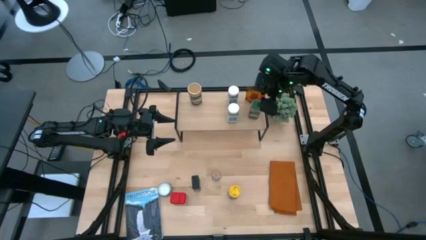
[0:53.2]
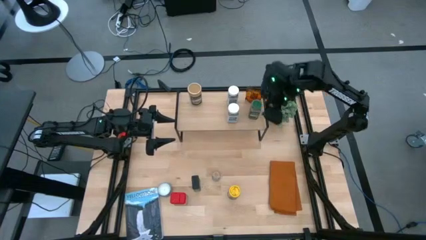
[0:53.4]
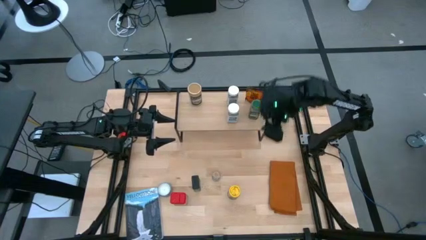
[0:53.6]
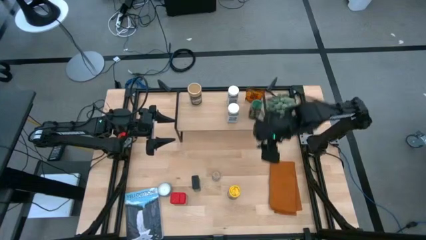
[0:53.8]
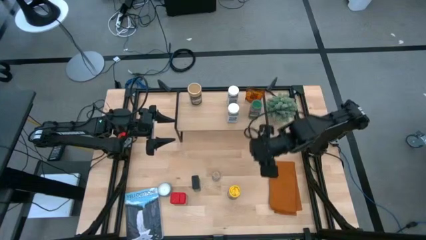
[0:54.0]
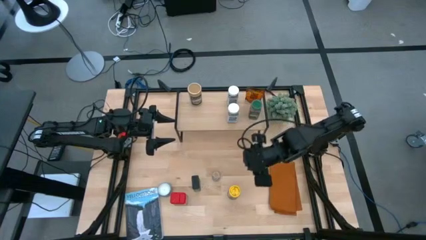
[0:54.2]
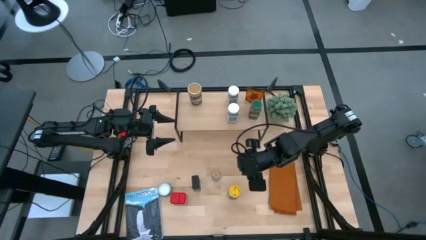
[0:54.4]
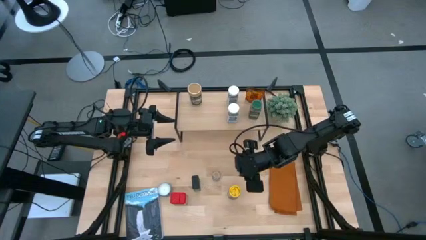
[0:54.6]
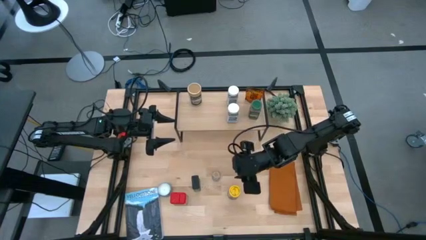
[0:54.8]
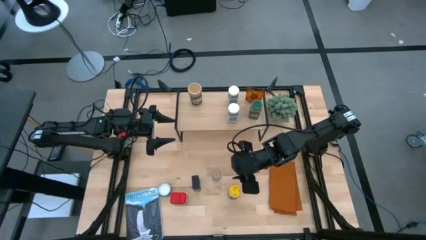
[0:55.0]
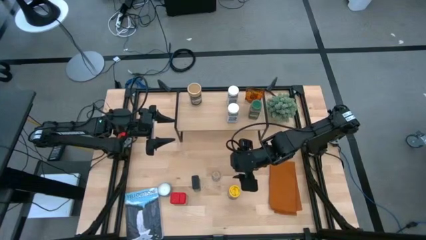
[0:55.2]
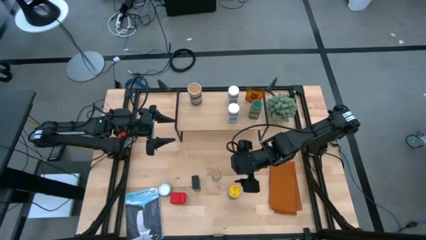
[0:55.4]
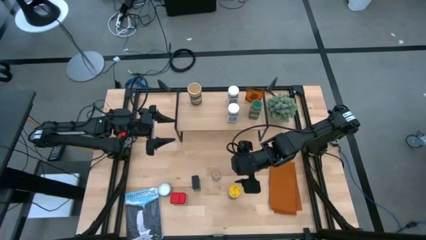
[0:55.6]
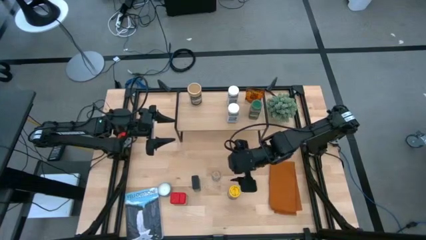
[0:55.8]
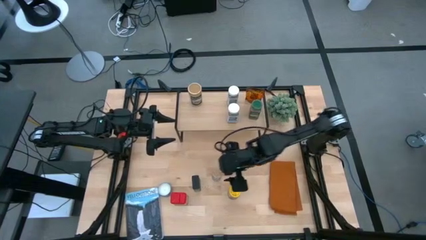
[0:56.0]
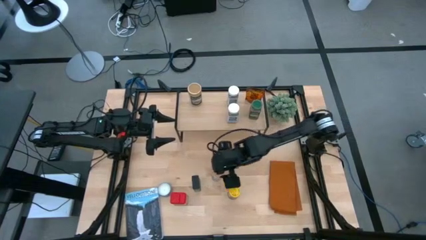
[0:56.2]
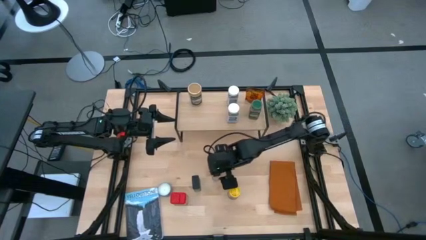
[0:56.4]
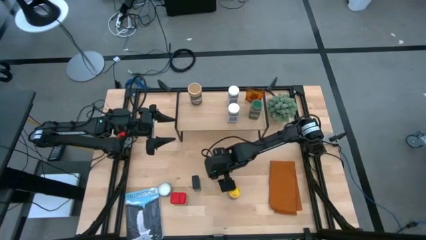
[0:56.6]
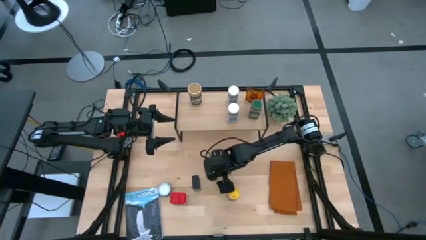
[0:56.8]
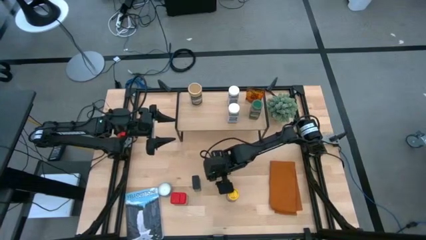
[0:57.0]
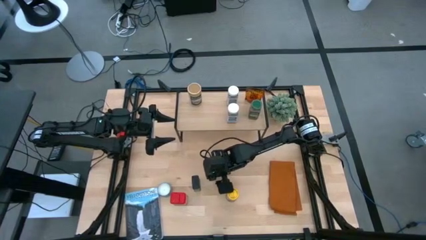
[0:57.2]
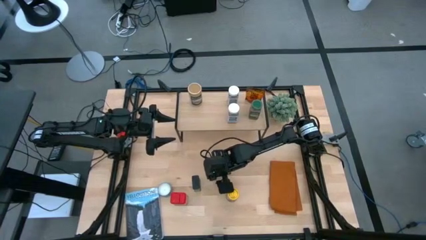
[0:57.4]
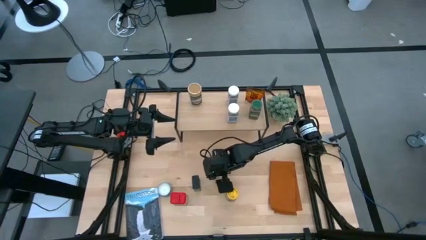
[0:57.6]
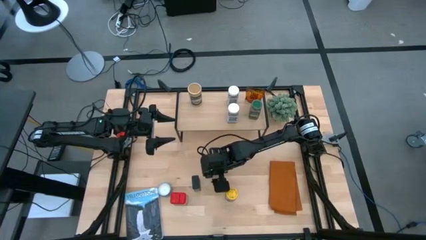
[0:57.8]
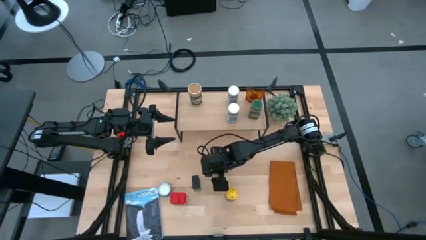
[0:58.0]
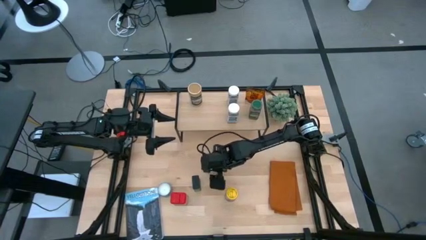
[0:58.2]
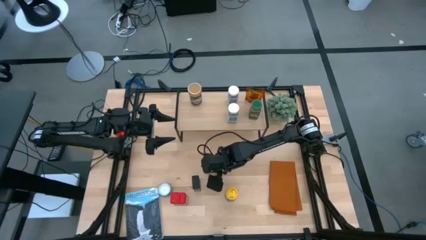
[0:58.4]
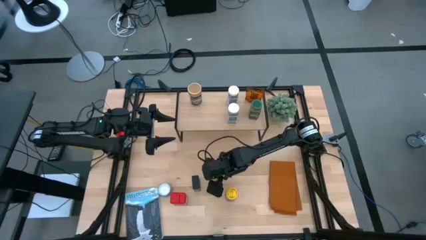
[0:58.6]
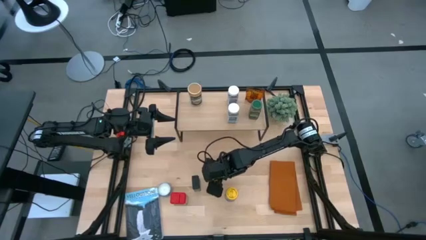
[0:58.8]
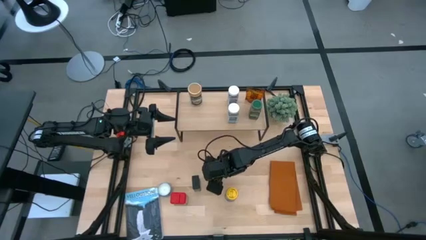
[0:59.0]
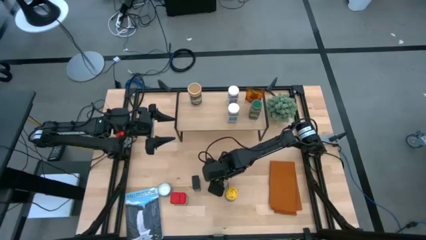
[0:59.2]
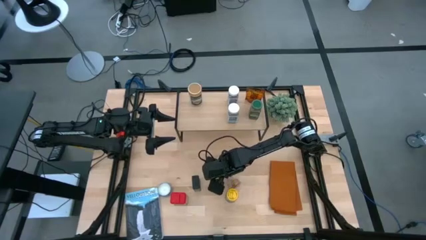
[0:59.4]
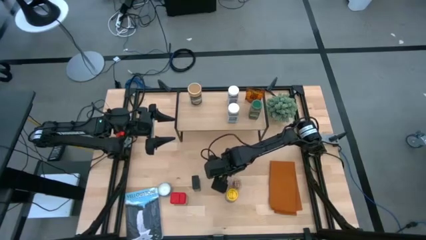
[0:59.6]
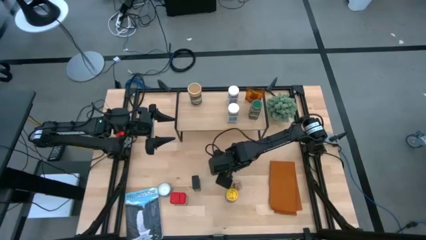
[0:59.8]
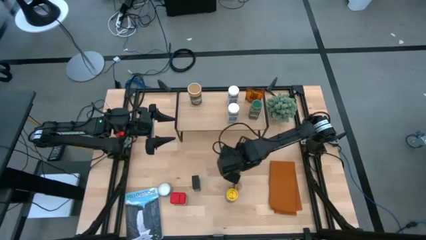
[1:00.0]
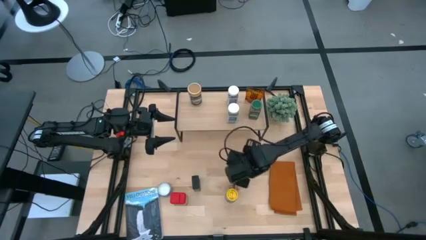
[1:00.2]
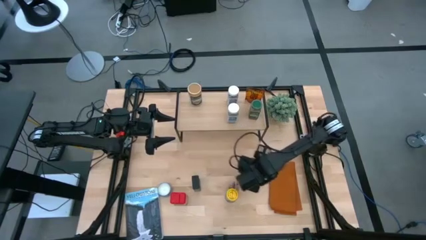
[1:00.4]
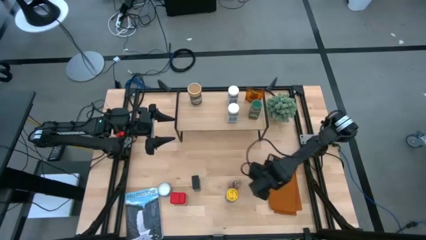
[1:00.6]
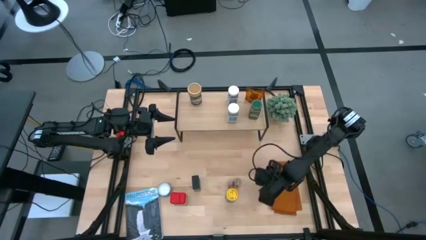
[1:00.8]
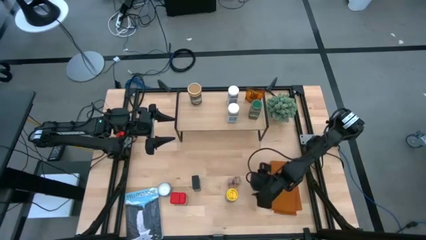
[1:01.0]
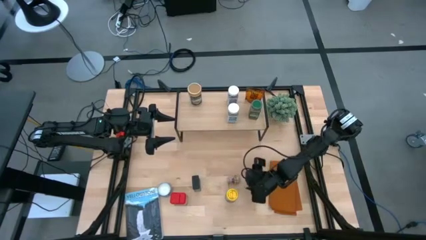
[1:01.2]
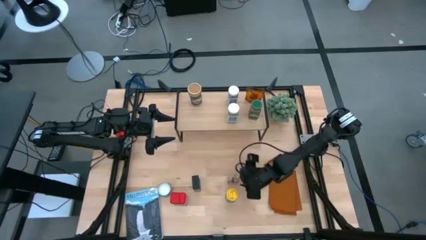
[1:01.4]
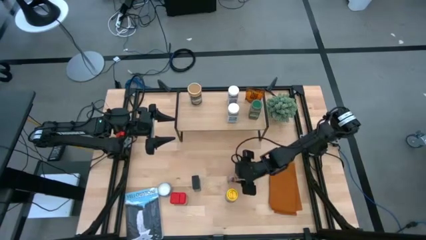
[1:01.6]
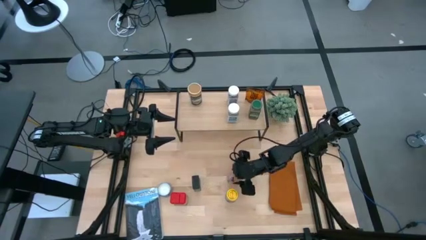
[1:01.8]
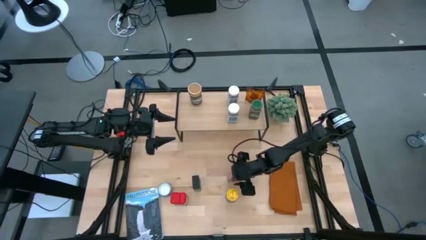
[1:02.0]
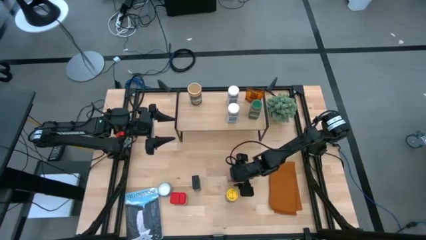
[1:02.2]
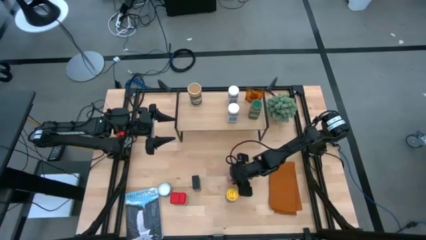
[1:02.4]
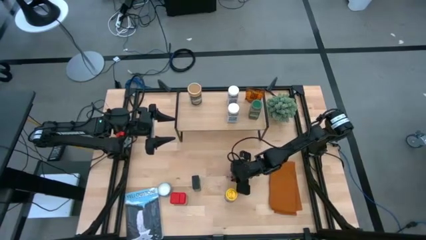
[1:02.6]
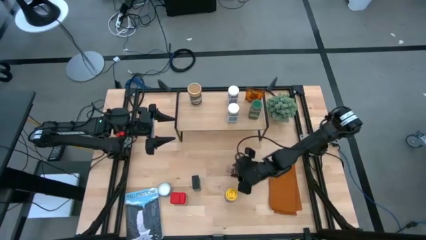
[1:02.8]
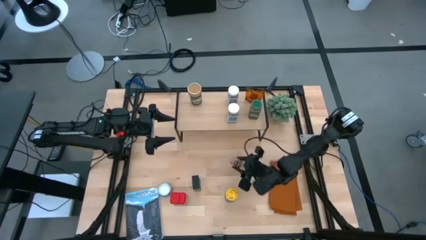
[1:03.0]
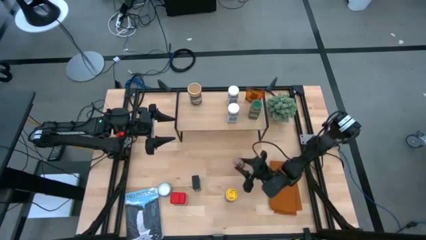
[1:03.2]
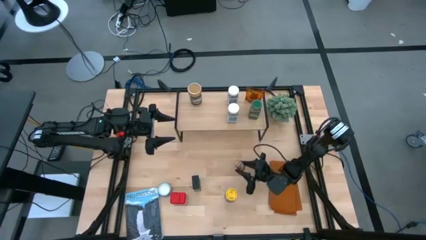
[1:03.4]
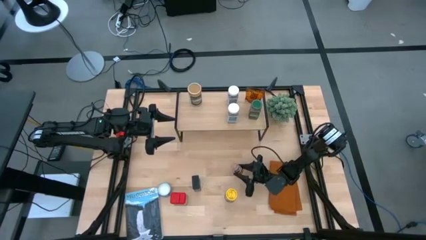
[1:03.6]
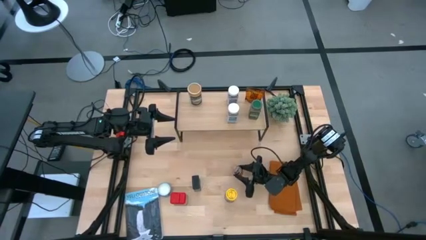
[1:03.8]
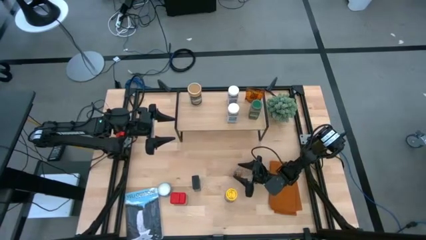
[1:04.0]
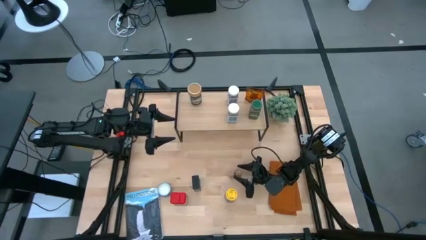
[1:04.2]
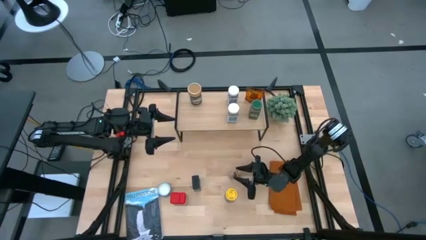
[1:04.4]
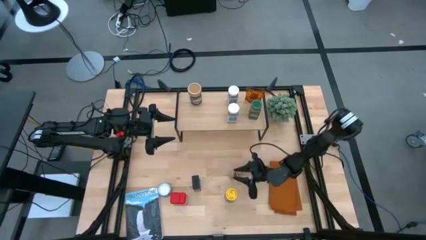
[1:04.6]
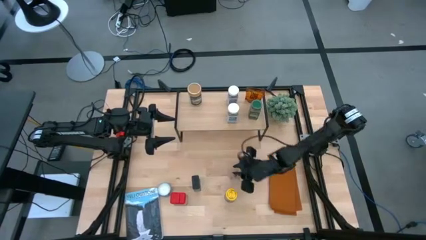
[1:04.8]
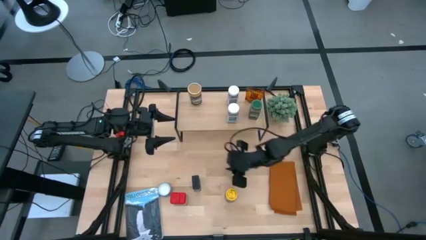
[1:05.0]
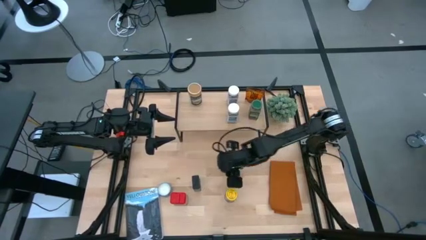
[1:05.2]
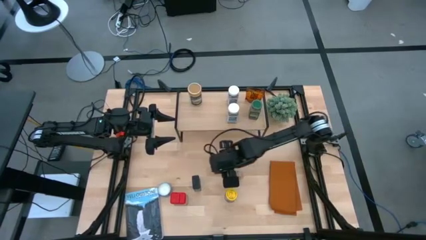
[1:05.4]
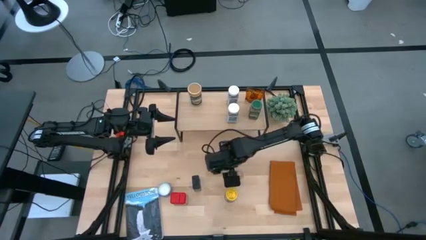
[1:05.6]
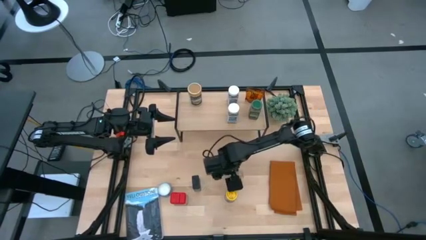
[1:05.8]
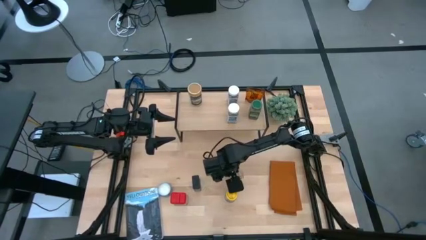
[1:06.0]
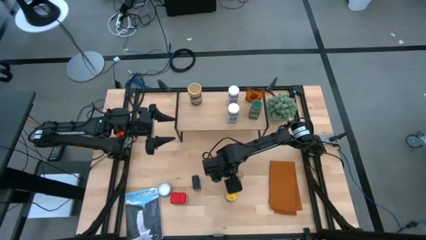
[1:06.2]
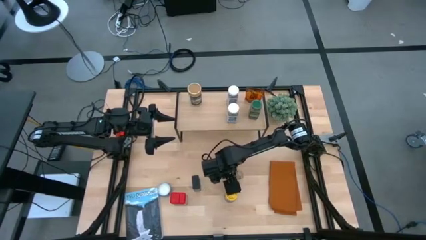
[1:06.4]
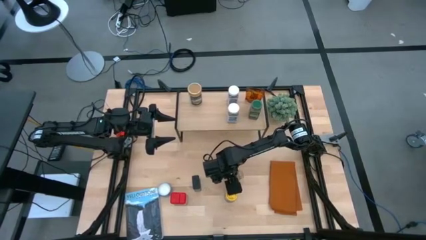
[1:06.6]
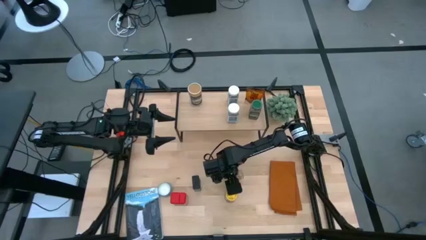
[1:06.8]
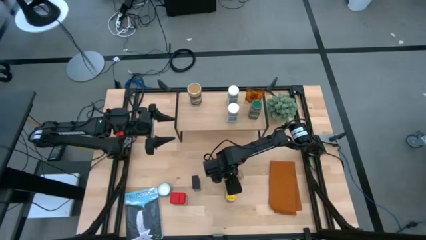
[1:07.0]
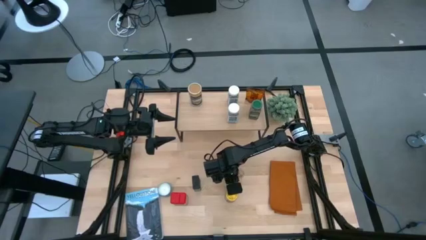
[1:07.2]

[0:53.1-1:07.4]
Task: Shelf spices
Put the brown seasoning bottle on the shelf
